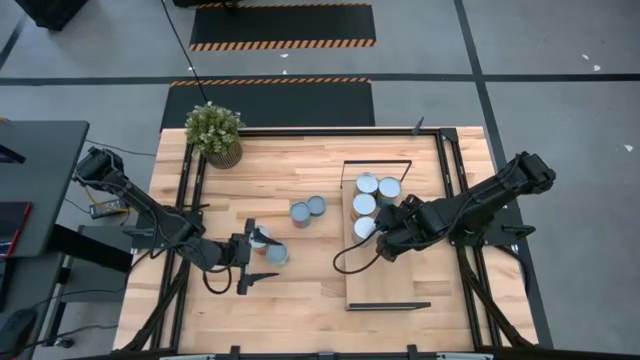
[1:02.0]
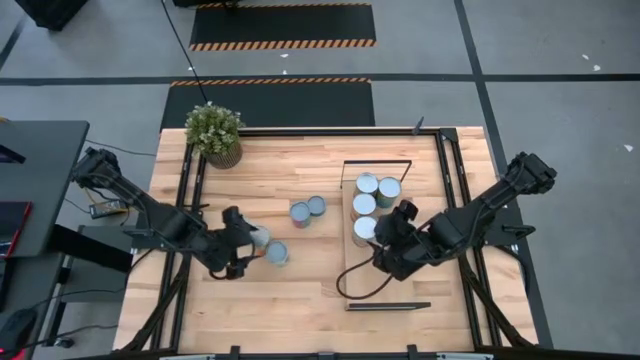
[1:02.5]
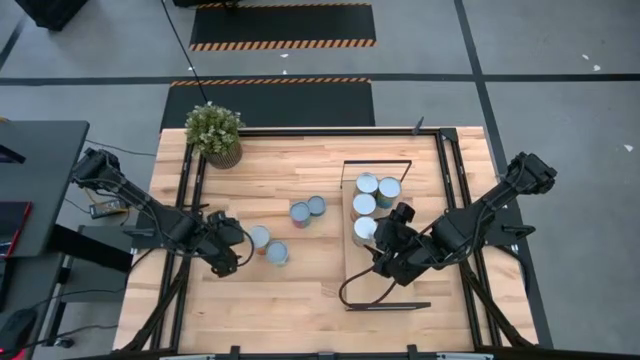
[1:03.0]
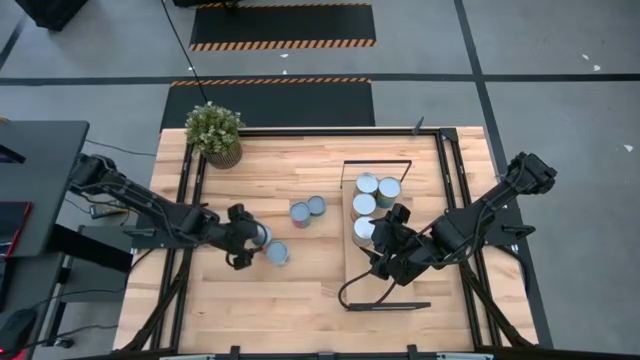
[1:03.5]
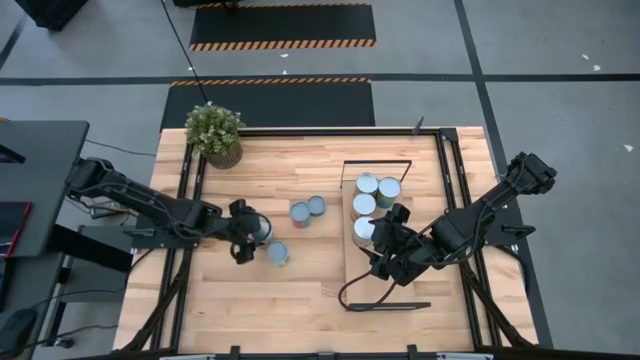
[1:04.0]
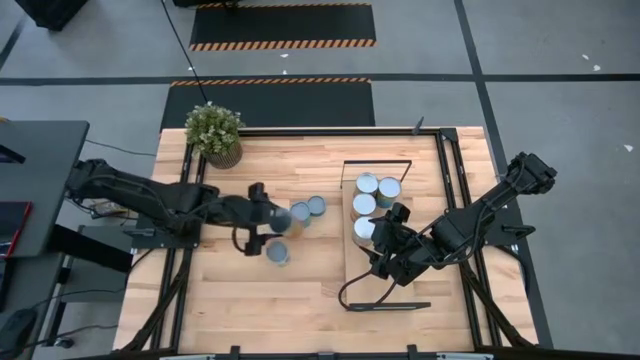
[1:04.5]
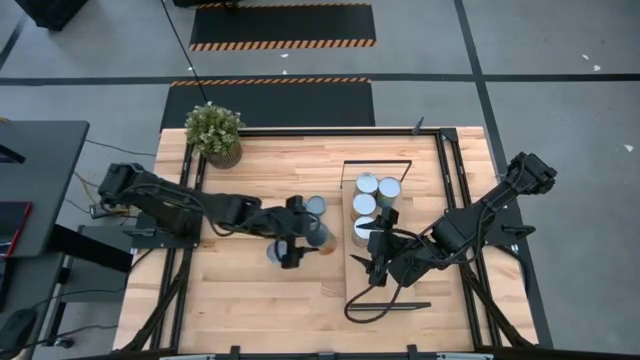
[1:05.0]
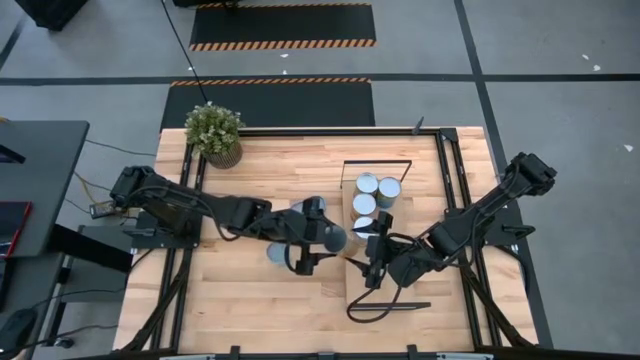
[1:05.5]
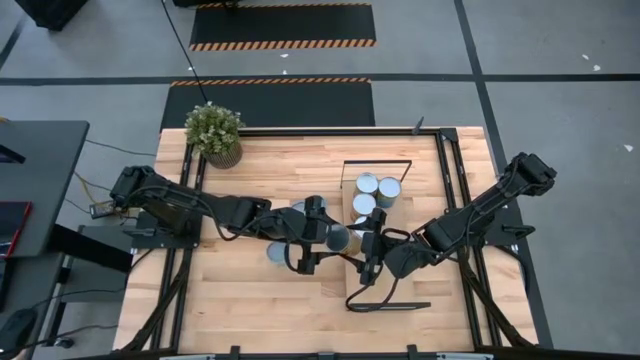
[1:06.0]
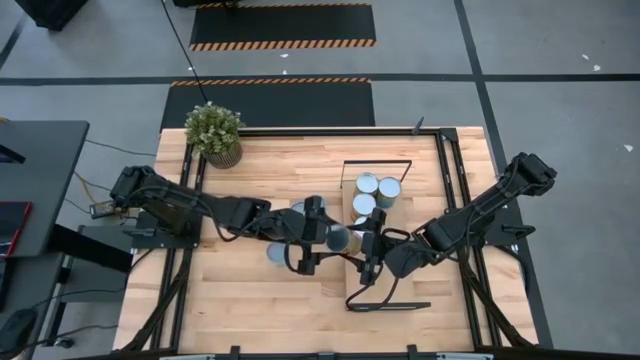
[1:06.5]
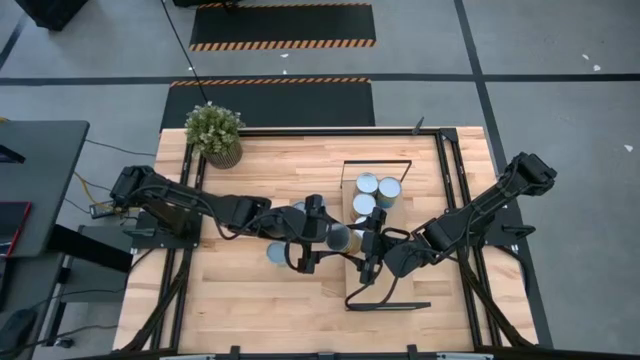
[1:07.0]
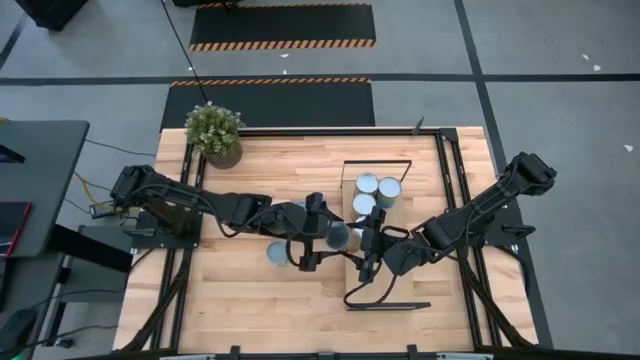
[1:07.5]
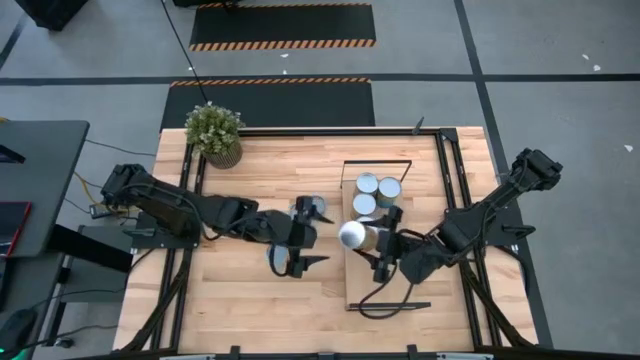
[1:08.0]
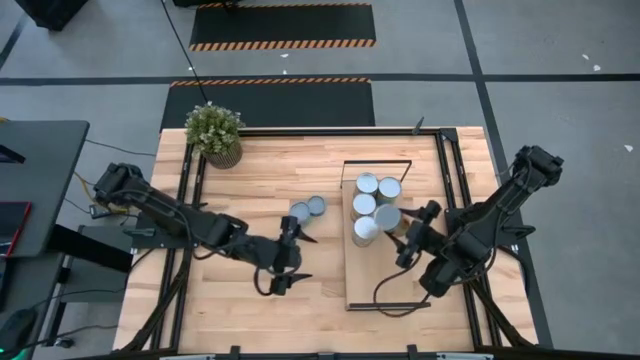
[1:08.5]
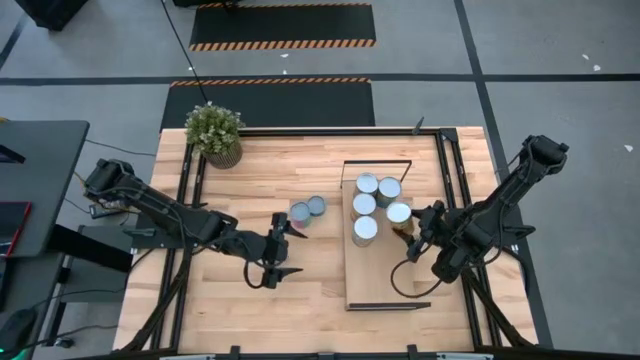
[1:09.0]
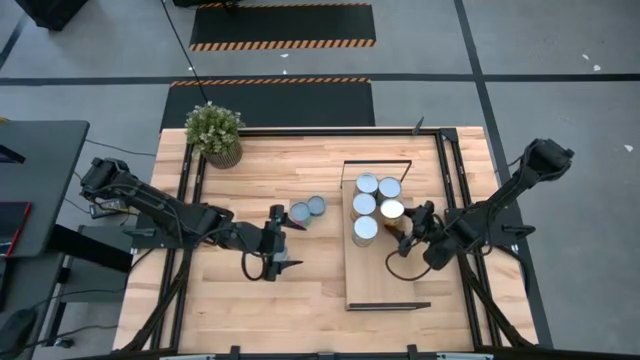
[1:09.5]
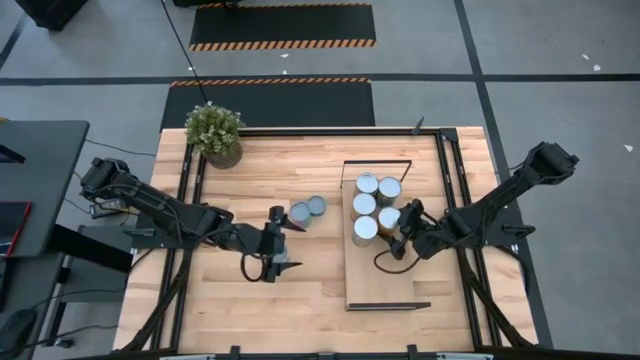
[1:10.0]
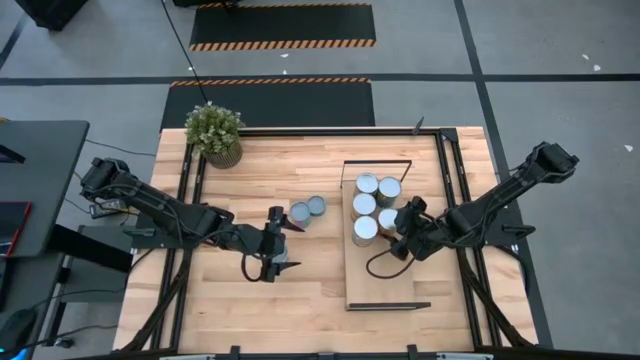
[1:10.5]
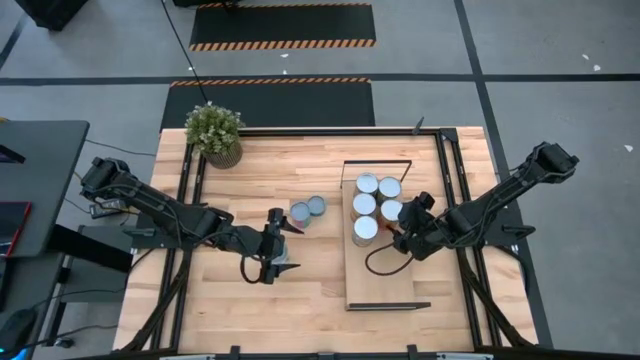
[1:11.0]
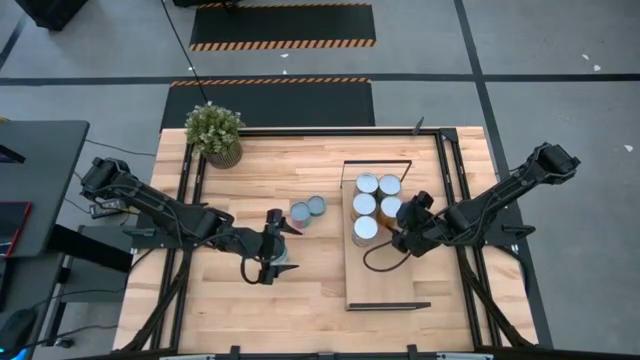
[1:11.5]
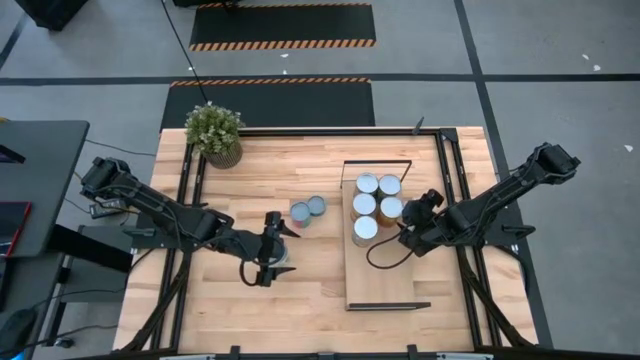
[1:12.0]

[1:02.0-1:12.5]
Task: Pick and place cans onto a shelf
Put the canned pineapple on the shelf

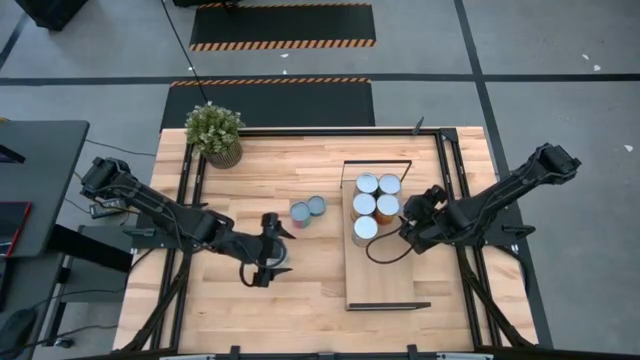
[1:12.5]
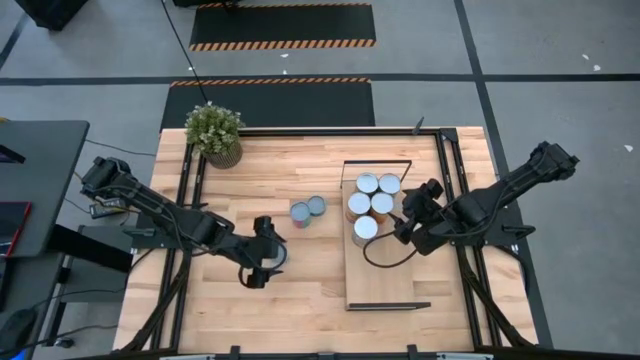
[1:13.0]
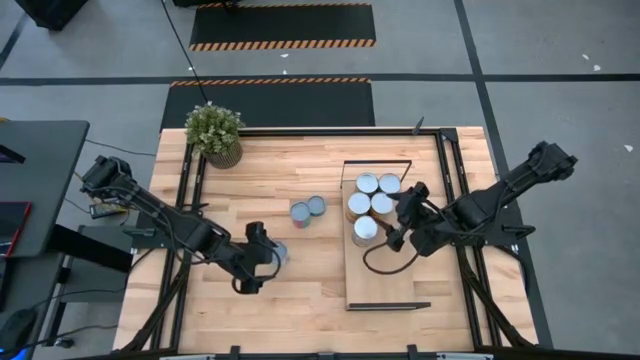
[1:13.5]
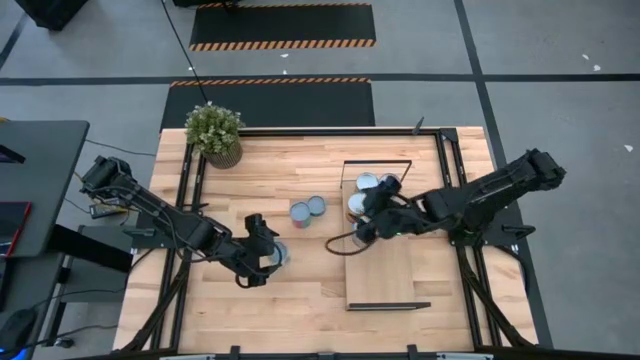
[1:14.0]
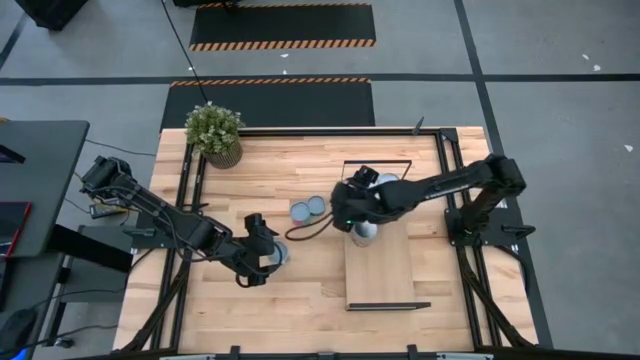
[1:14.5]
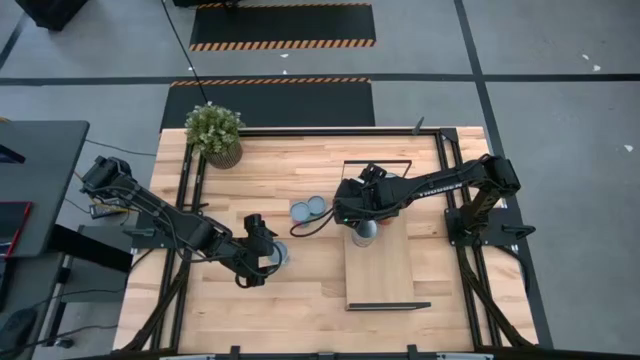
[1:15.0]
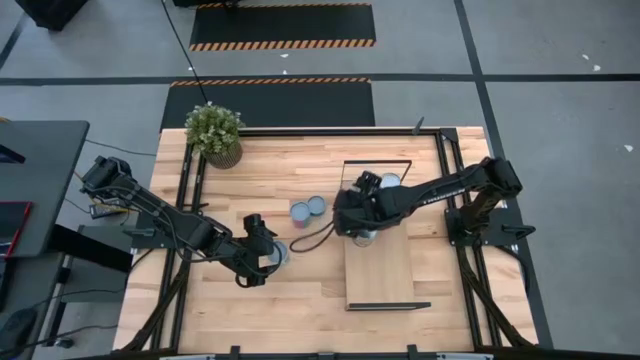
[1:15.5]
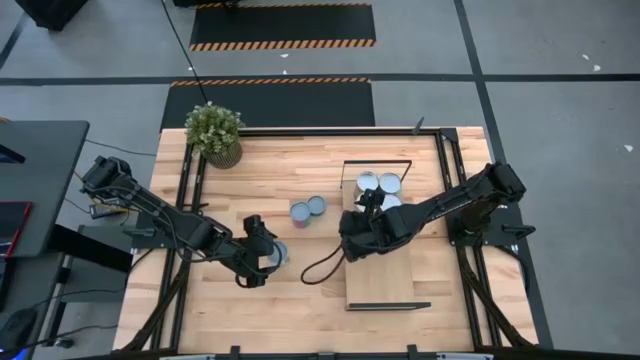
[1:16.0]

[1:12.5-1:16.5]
Adjust the cans on the shelf

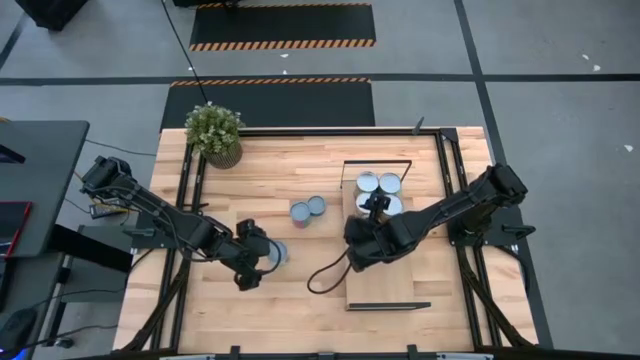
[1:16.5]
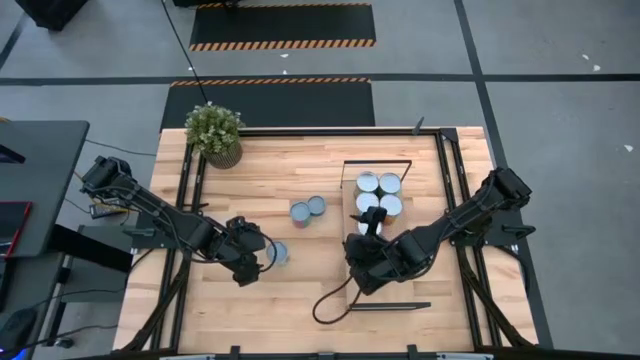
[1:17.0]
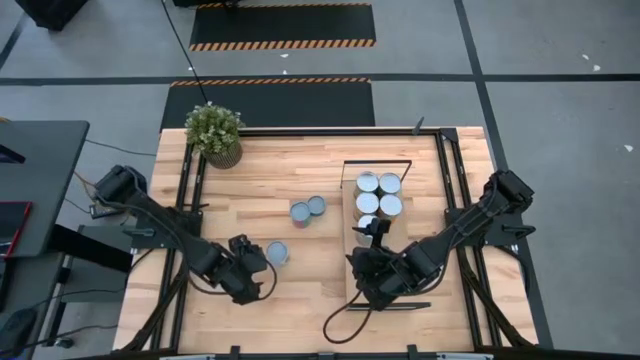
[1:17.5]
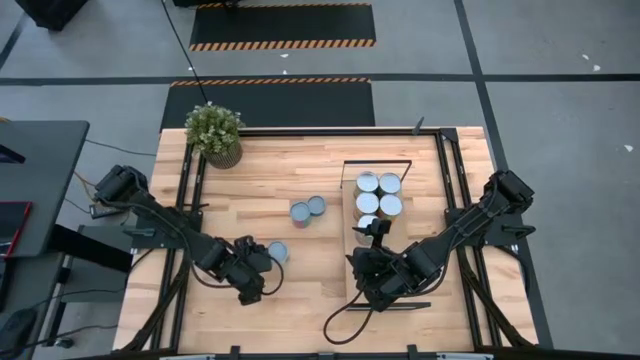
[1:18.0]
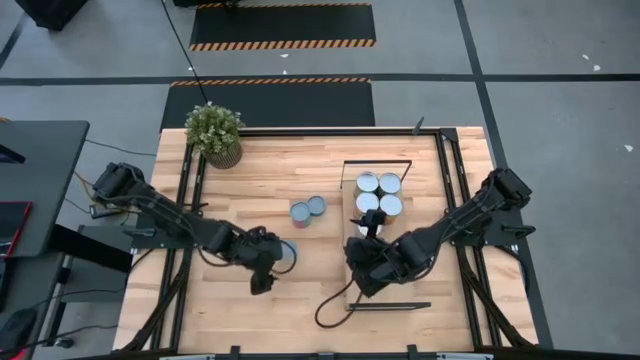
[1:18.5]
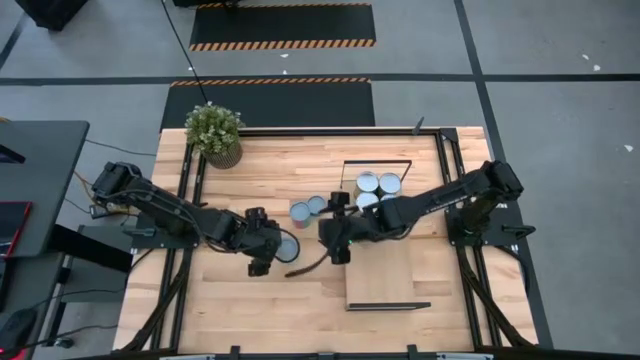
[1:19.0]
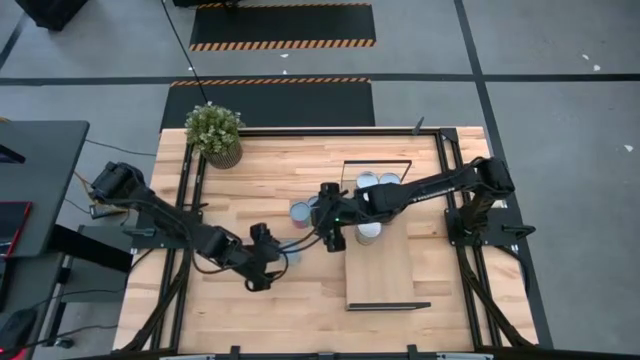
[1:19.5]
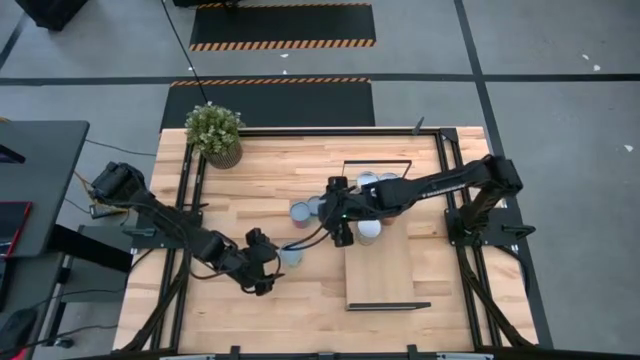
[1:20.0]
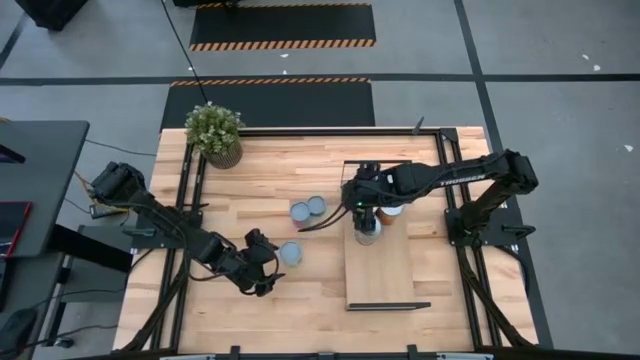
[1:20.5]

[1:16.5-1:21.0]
Adjust the canned mixed fruits on the table

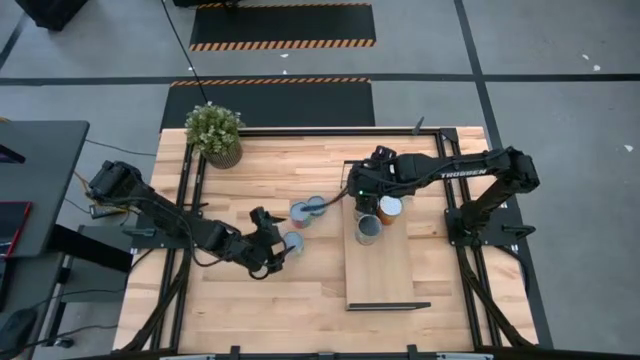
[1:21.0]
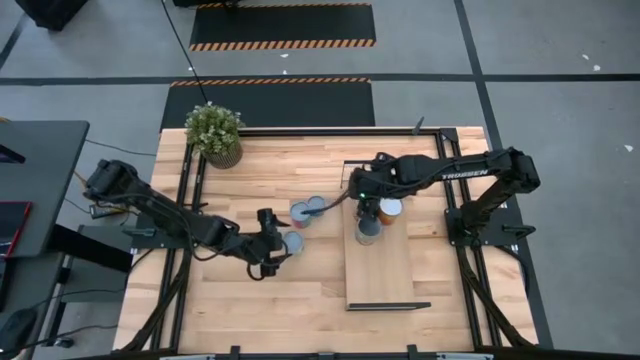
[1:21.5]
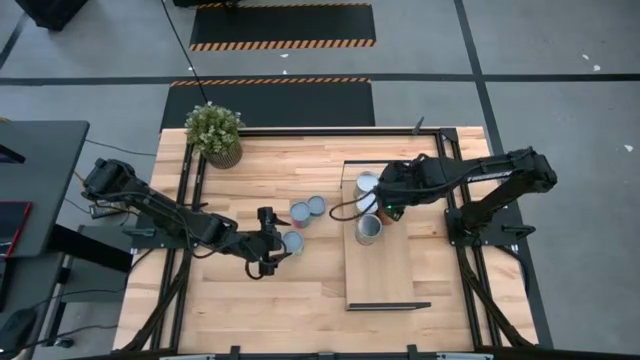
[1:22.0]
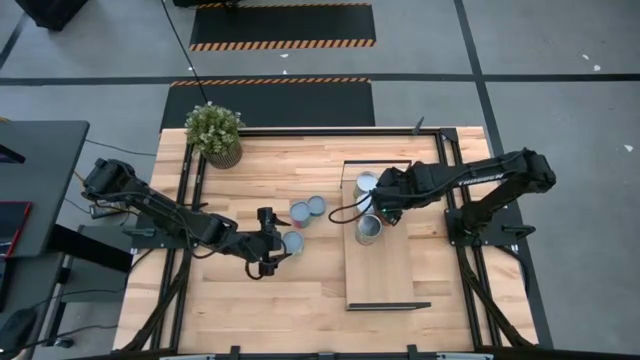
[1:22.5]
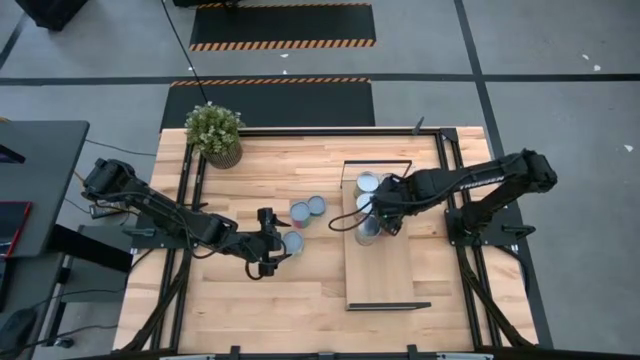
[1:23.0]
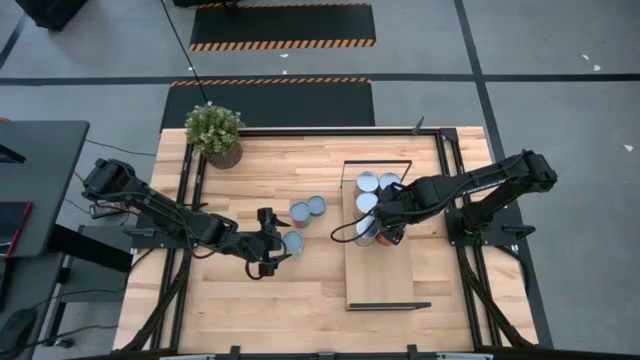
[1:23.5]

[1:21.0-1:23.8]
Adjust the canned pineapple on the shelf
